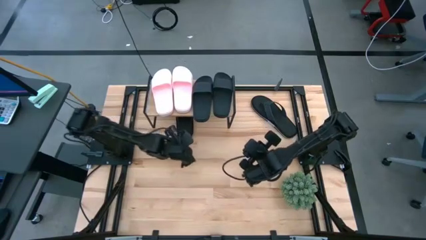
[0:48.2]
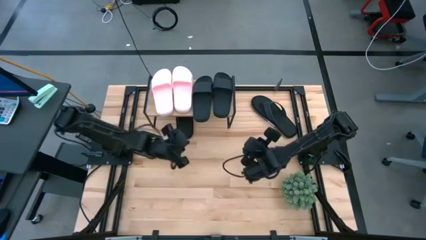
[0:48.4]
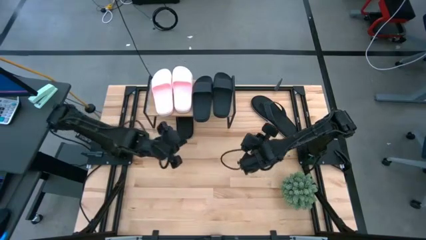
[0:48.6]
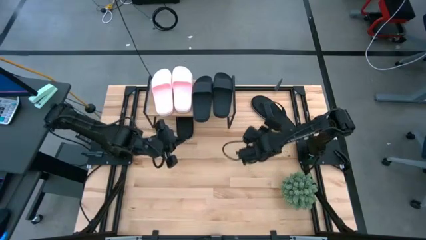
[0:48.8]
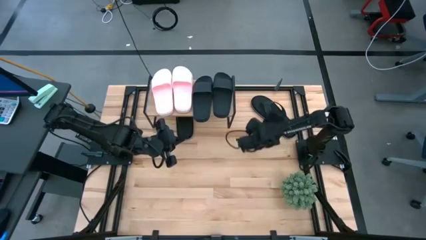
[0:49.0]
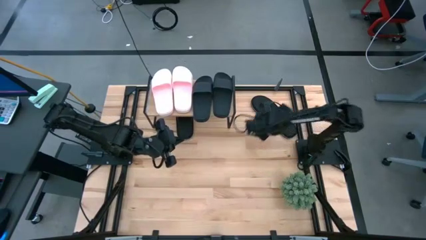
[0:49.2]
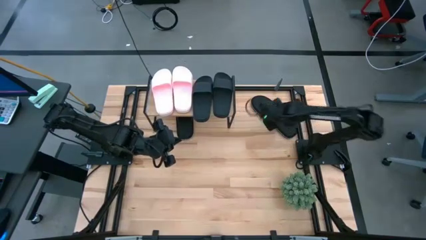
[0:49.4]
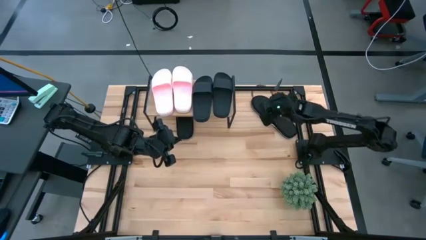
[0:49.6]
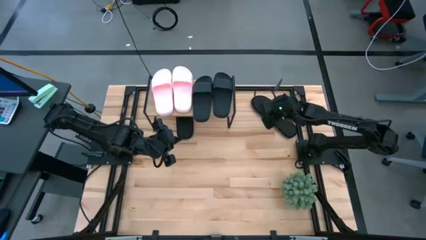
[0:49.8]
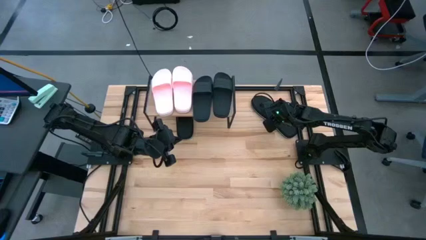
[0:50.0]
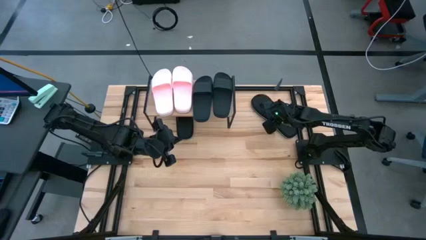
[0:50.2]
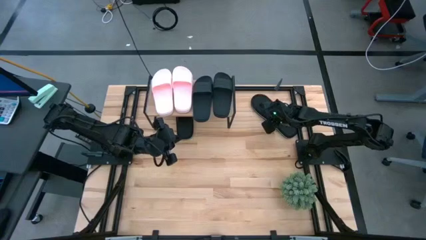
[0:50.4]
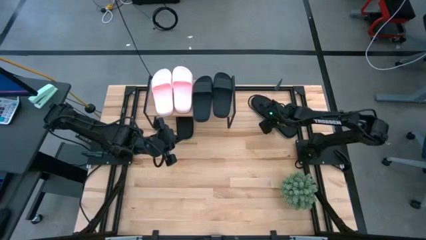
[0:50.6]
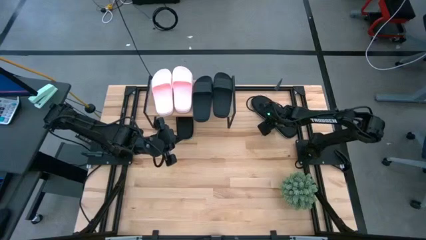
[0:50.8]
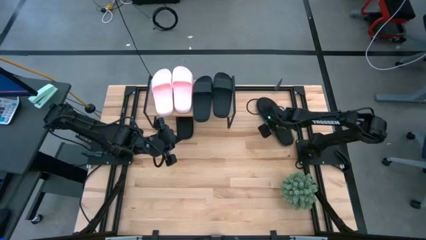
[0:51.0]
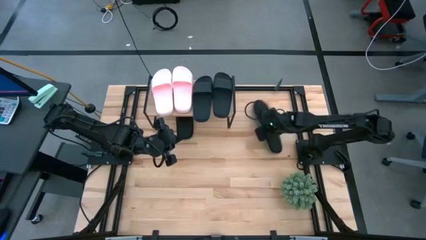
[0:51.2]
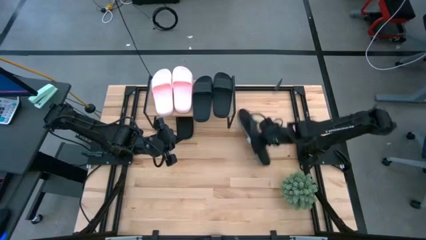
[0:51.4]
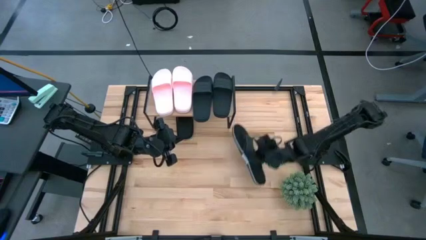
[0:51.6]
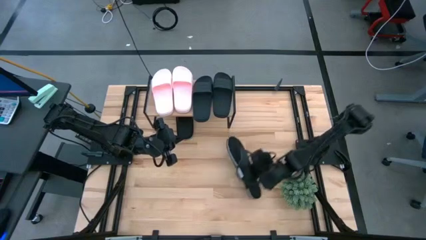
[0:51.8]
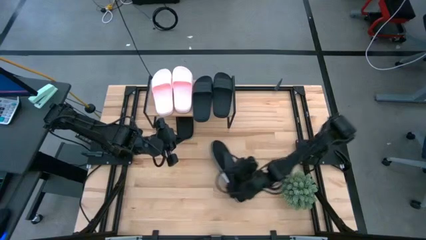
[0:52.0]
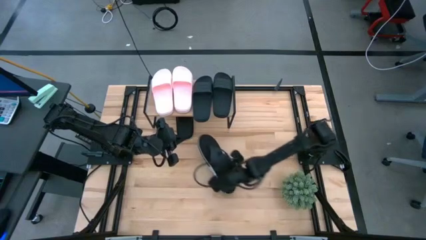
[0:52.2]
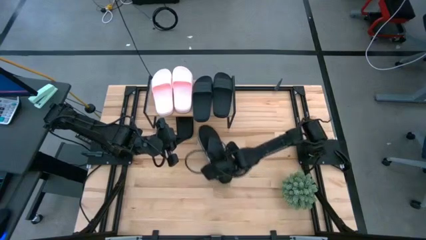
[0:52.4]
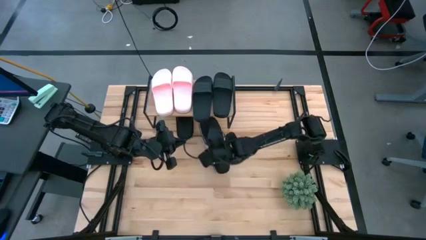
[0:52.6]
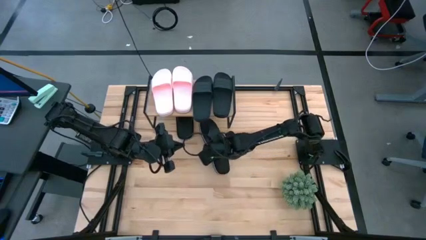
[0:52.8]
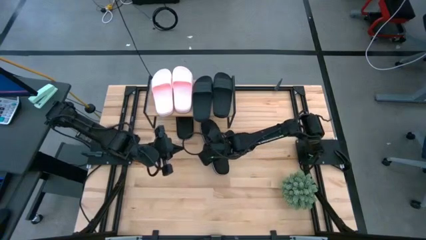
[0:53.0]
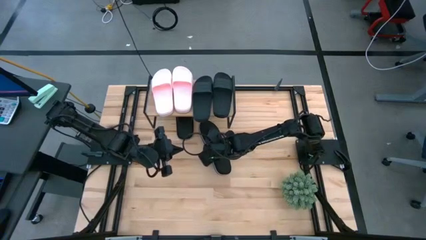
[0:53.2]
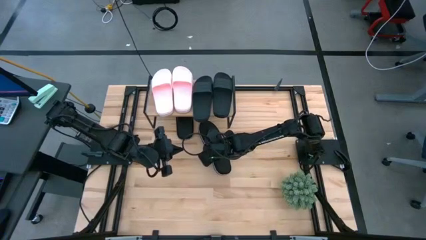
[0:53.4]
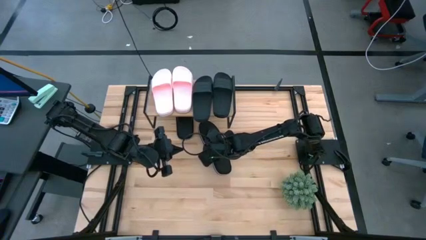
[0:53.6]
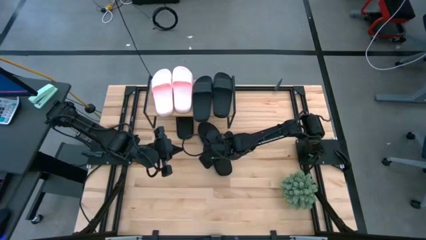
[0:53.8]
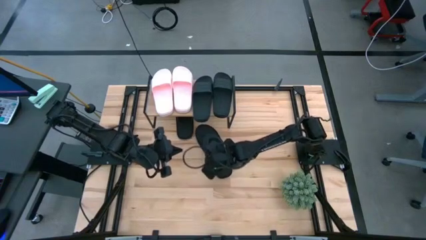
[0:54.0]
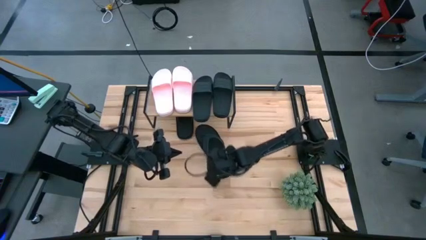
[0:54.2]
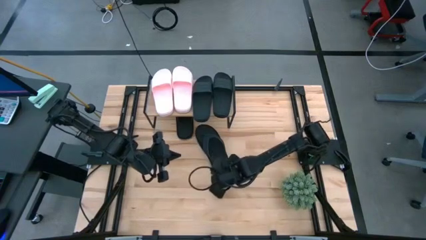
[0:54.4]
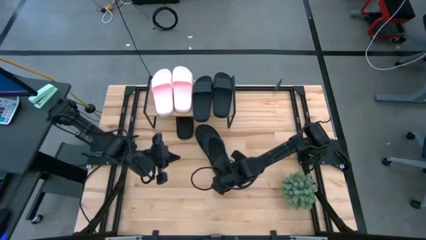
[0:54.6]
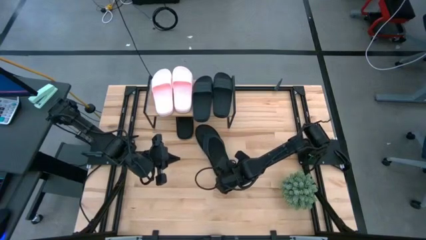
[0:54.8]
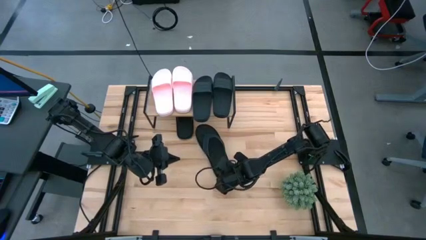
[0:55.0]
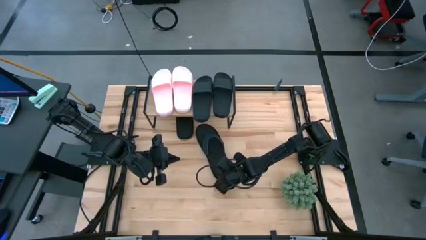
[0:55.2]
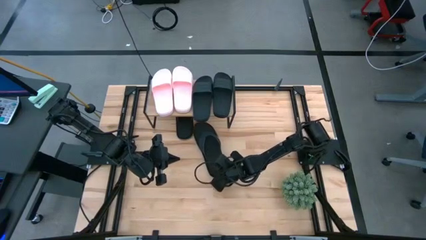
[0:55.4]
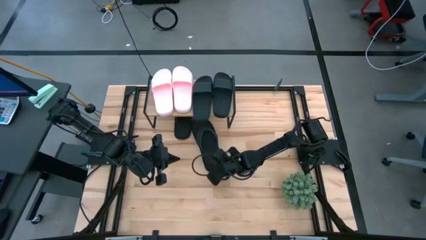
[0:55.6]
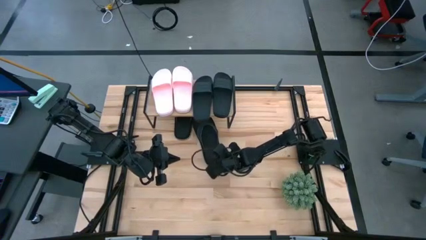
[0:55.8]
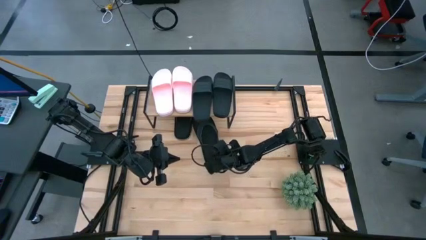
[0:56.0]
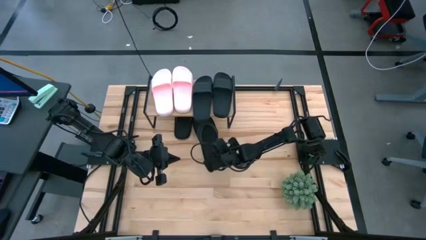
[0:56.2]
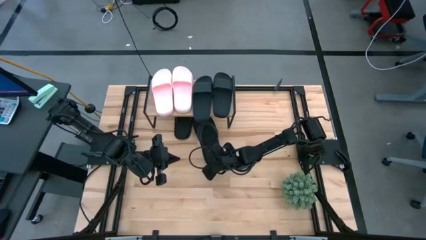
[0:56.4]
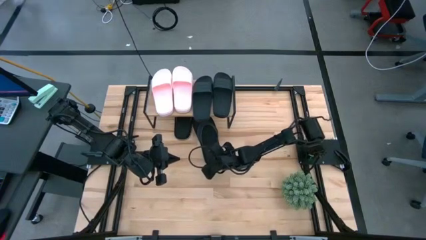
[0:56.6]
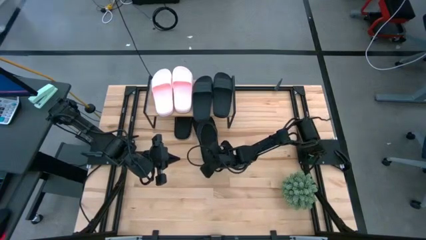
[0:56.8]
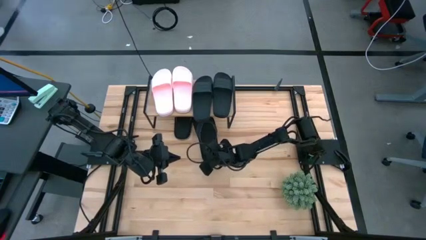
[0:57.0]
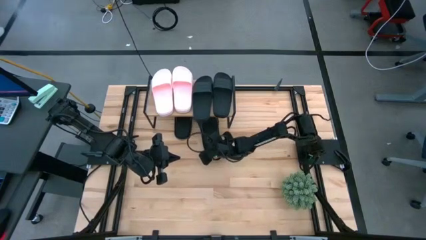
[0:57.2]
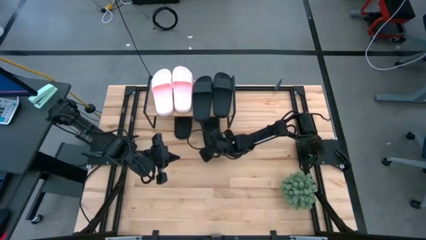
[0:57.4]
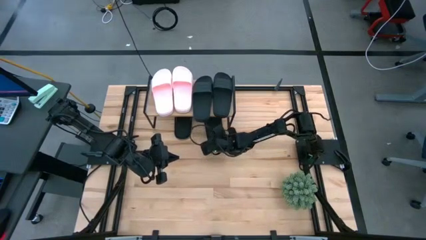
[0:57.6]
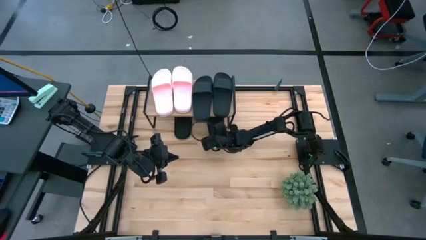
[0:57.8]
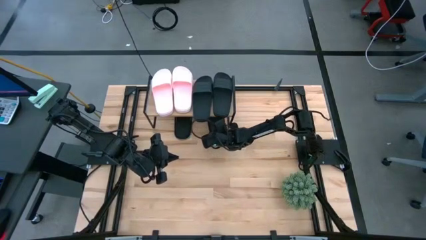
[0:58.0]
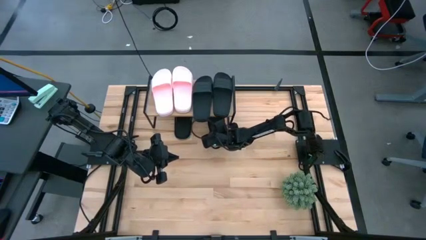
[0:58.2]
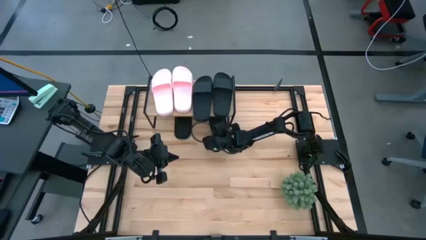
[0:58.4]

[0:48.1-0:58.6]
Task: Pick and place slides into the shelf
Put the black flipflop under the shelf

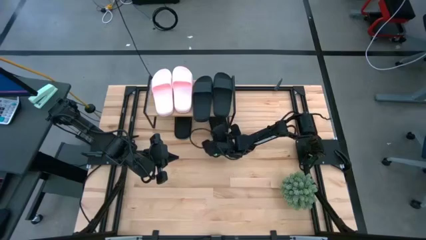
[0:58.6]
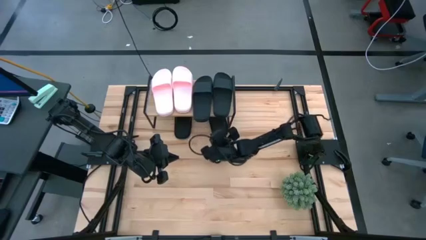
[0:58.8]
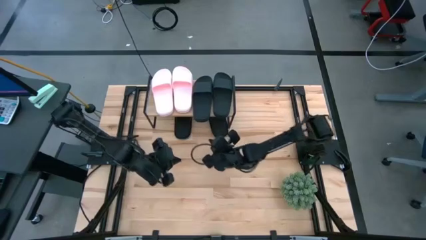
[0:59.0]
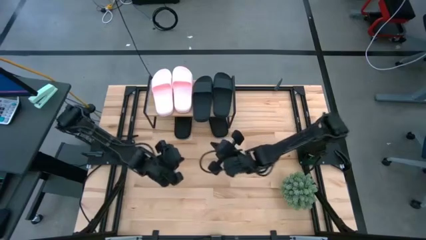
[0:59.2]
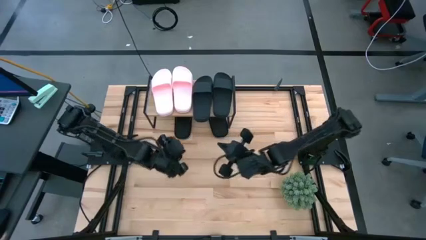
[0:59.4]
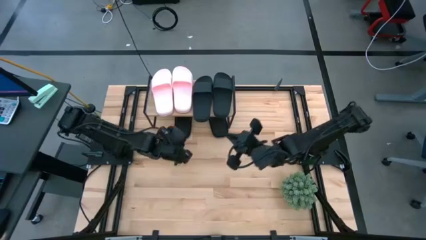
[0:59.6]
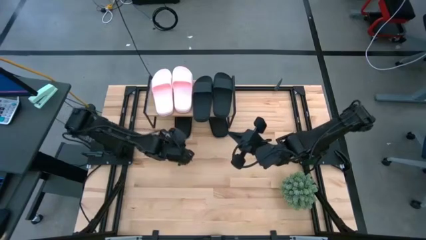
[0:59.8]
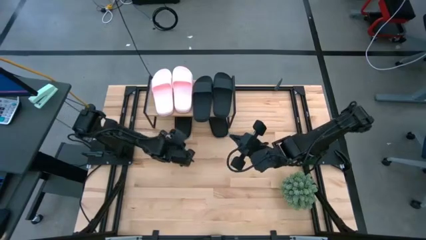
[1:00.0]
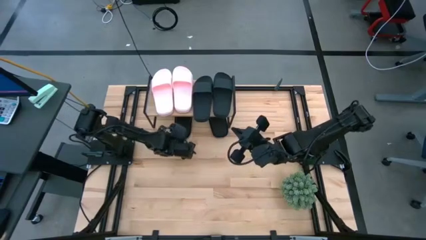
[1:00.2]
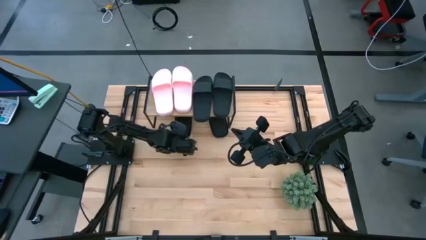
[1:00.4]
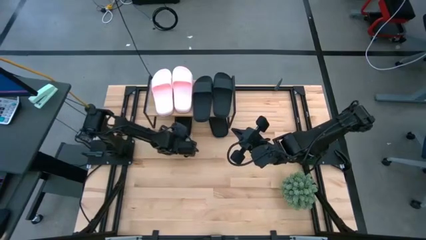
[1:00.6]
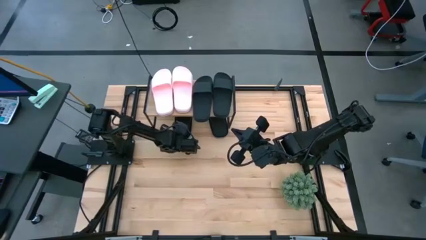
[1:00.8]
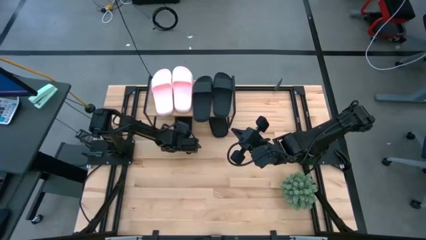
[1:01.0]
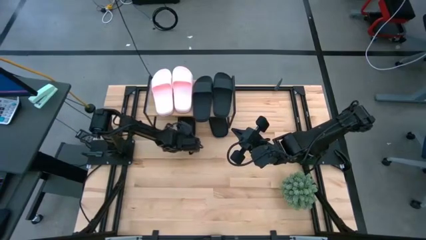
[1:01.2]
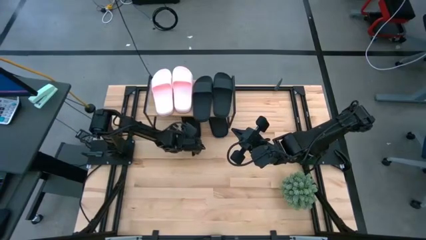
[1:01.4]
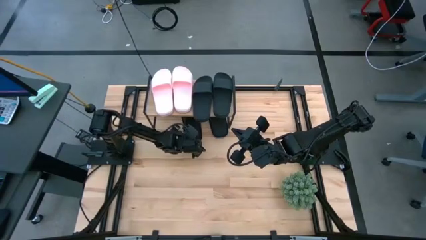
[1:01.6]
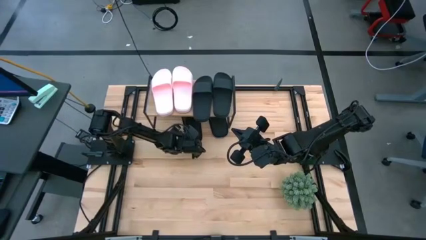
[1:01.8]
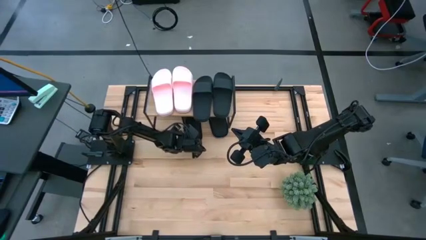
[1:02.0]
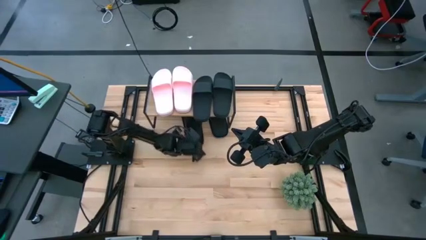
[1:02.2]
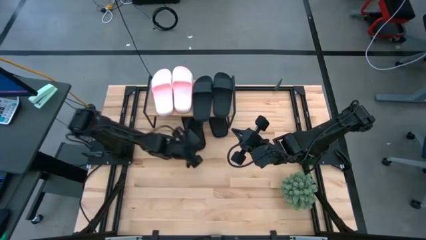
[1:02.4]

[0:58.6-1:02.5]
Adjust the black flipflop under the shelf

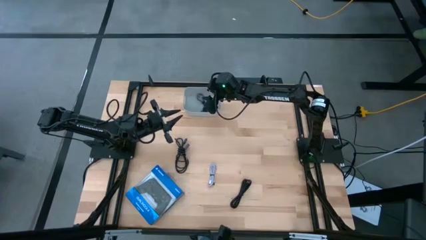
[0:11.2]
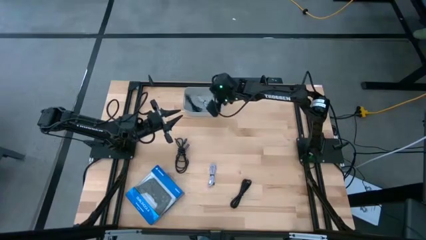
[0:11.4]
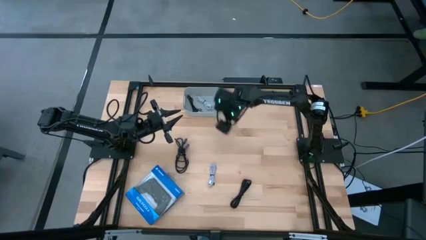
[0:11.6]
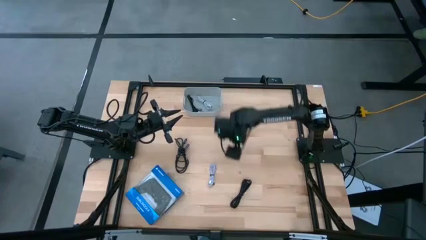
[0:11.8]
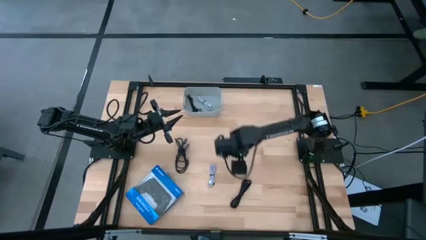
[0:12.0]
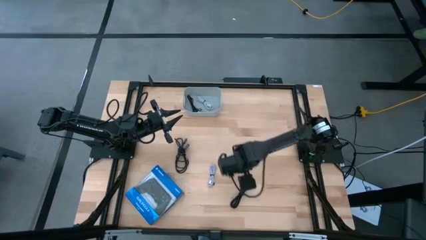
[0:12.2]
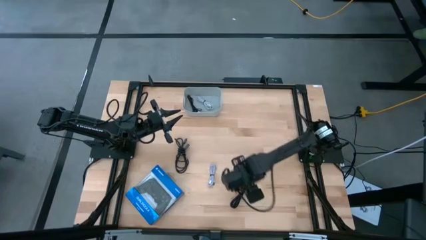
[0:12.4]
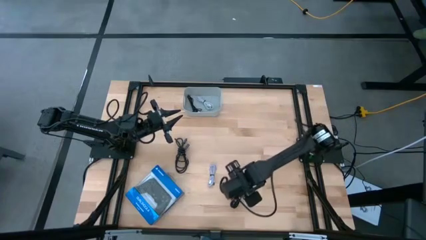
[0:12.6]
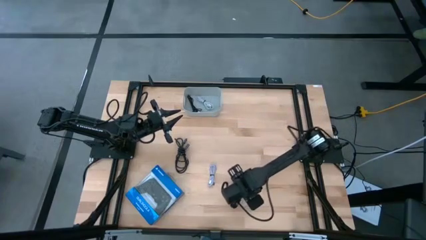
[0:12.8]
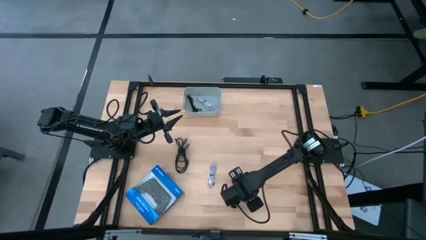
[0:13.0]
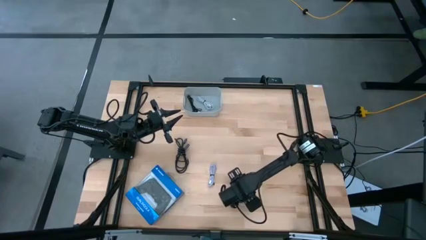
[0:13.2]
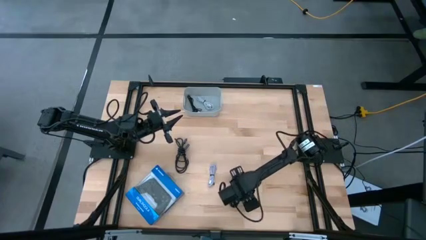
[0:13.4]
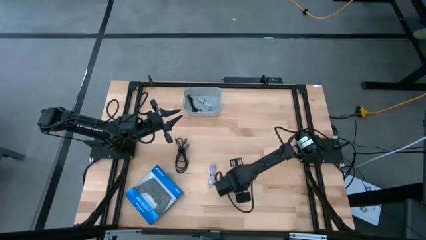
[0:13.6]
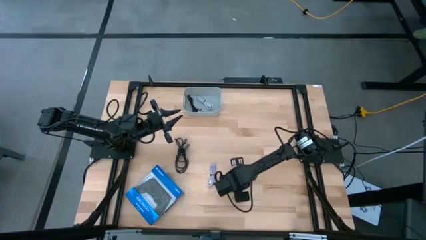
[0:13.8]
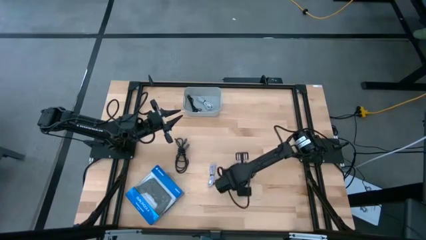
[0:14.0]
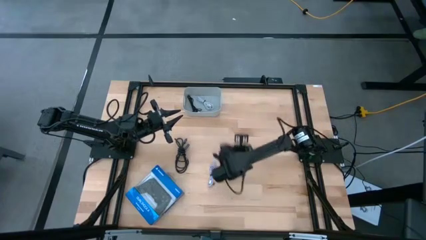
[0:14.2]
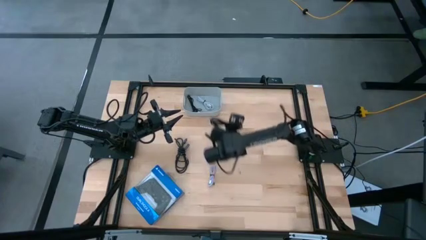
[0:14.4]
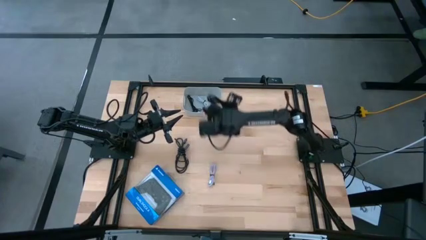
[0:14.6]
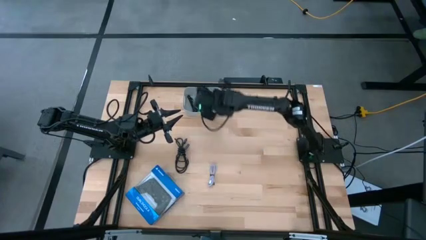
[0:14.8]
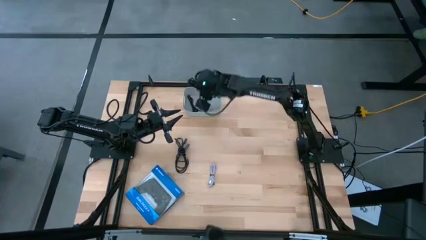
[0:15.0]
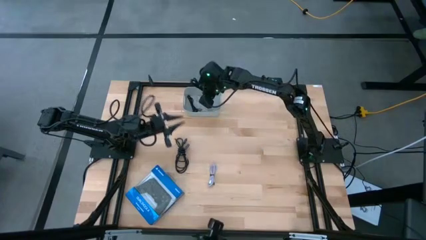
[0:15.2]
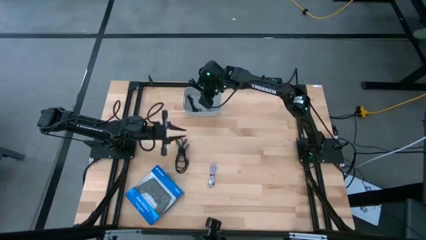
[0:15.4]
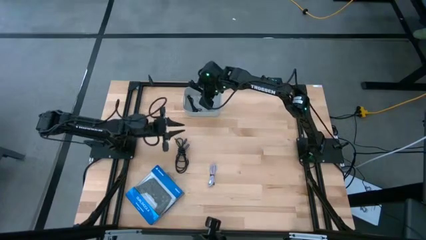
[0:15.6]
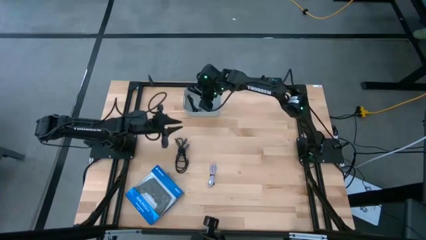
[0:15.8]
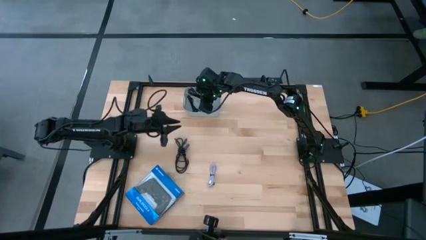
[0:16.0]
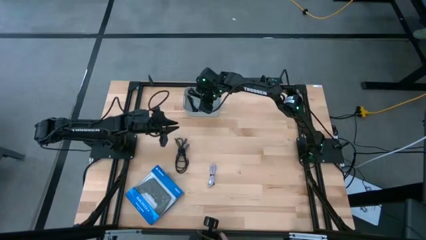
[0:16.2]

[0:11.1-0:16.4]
Task: Pick and place USB-C Cables
Put the bottom black charger cable into the white bin
